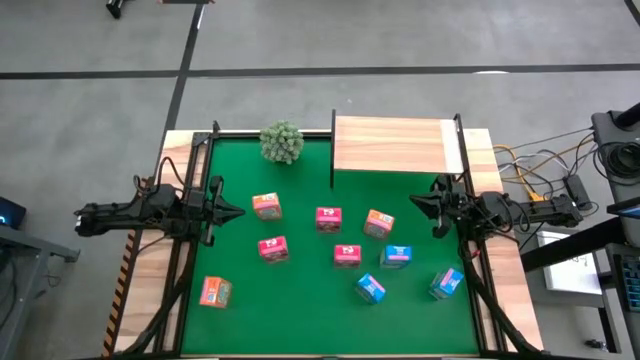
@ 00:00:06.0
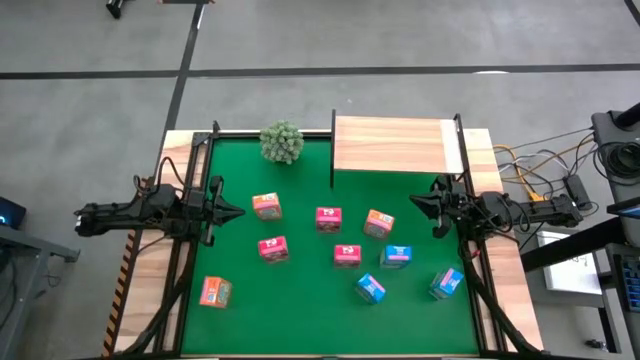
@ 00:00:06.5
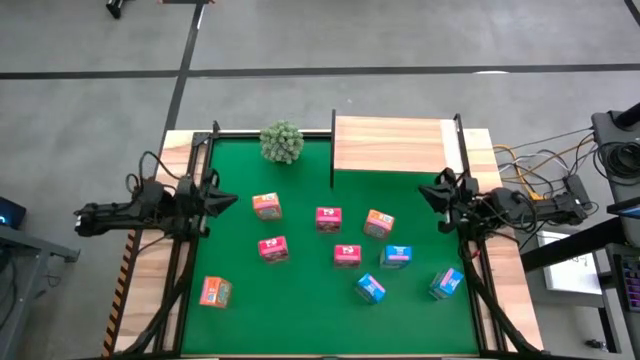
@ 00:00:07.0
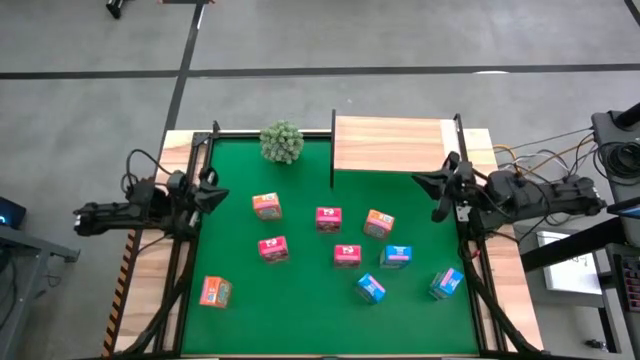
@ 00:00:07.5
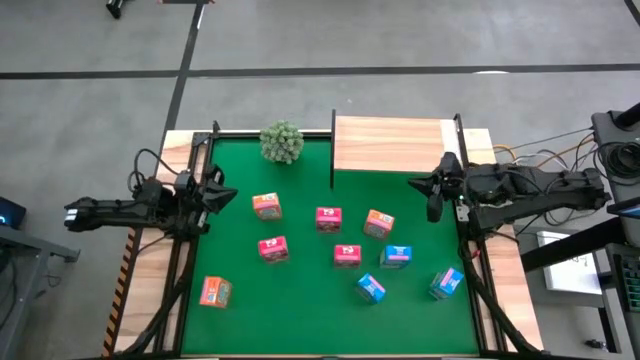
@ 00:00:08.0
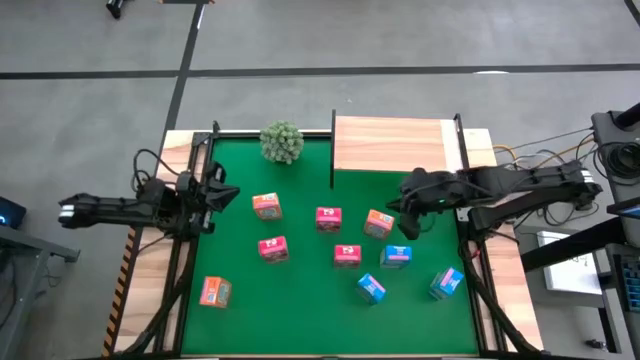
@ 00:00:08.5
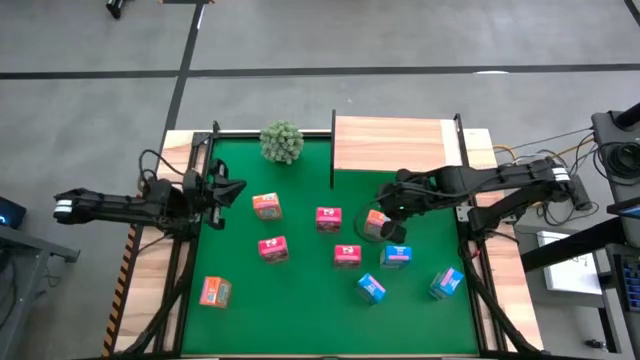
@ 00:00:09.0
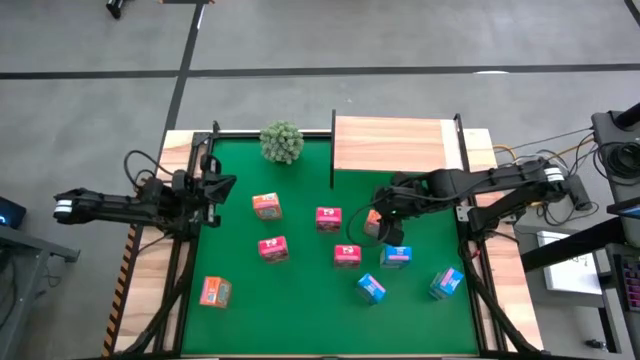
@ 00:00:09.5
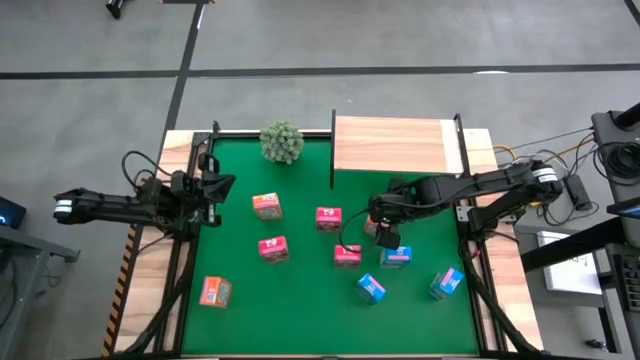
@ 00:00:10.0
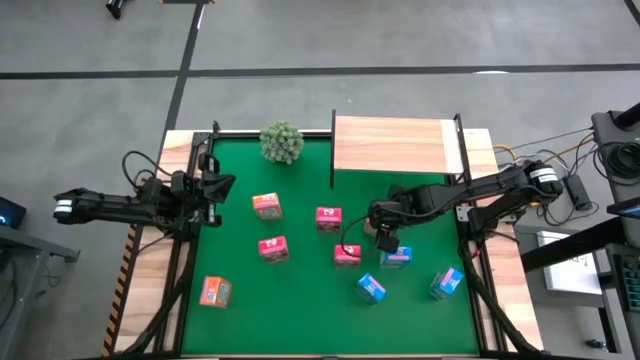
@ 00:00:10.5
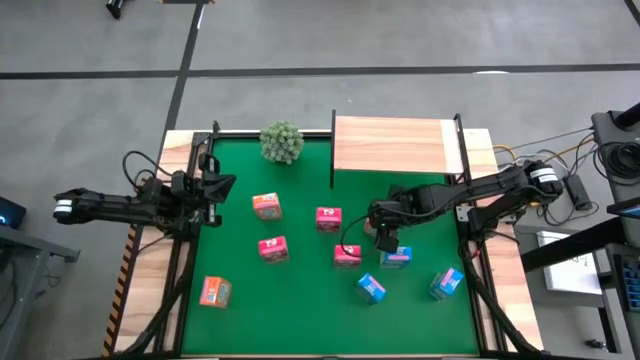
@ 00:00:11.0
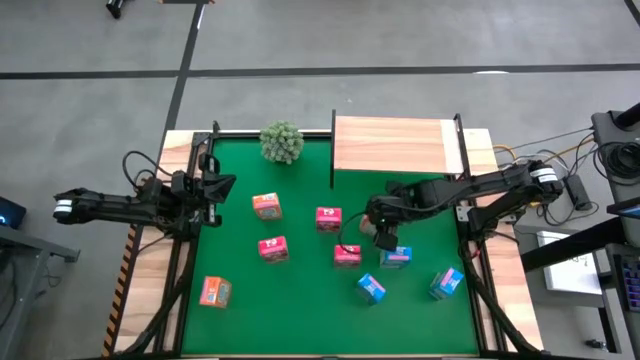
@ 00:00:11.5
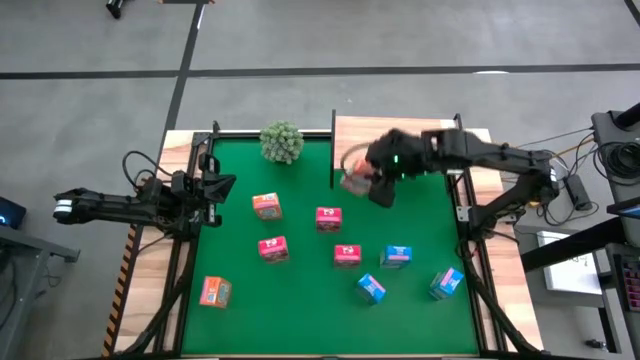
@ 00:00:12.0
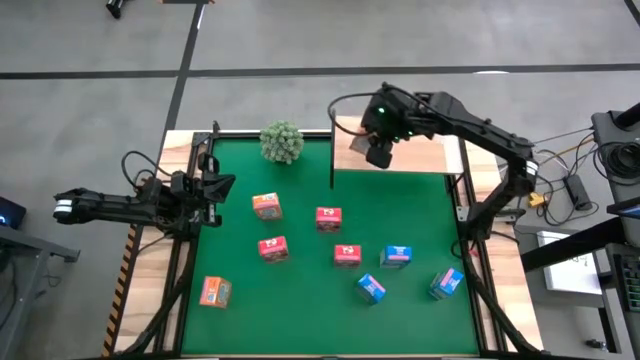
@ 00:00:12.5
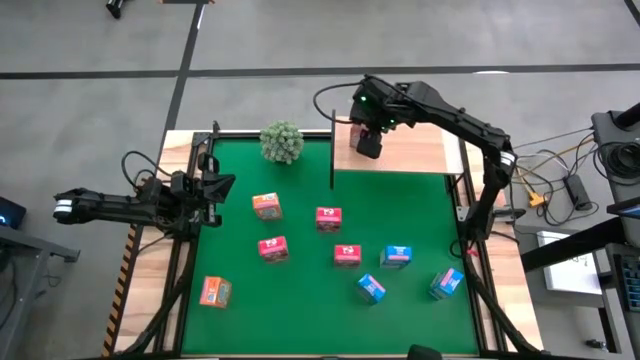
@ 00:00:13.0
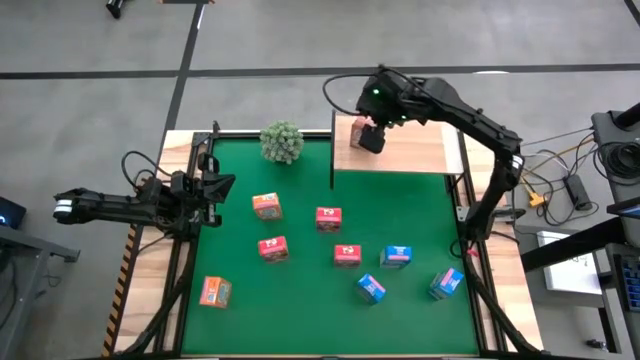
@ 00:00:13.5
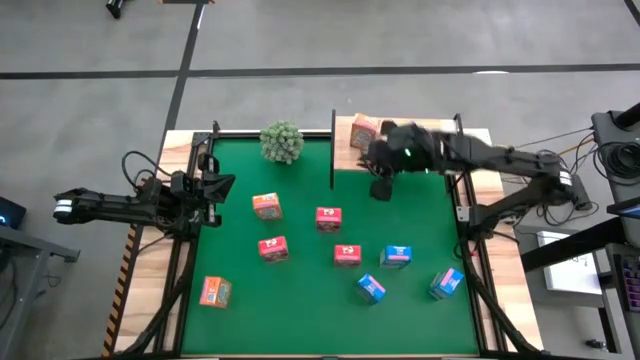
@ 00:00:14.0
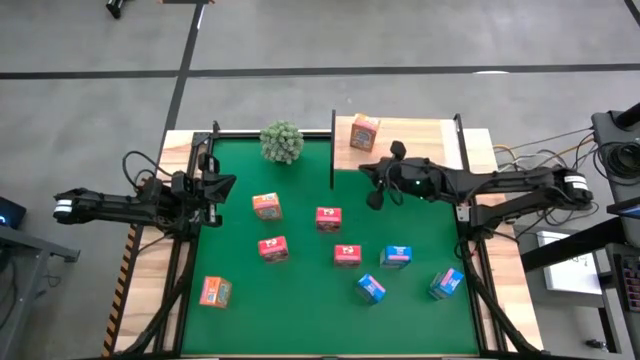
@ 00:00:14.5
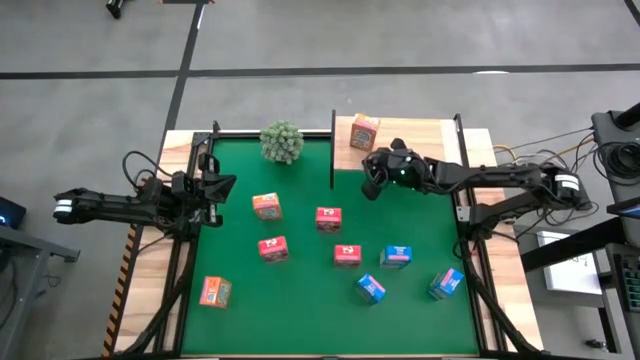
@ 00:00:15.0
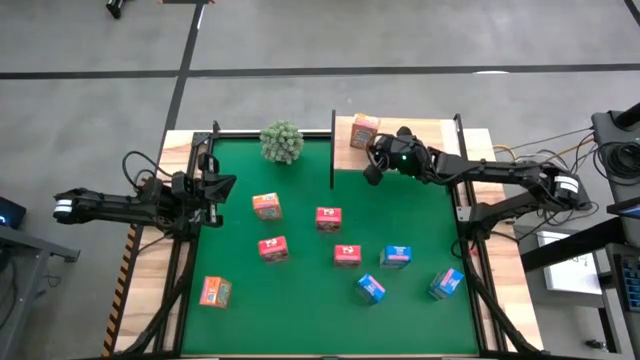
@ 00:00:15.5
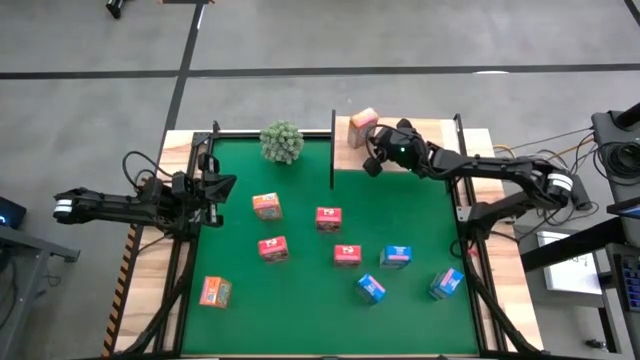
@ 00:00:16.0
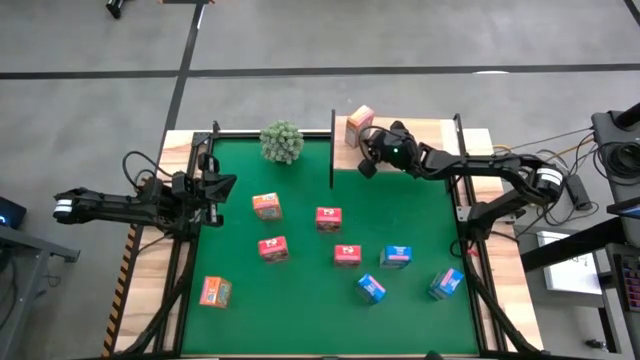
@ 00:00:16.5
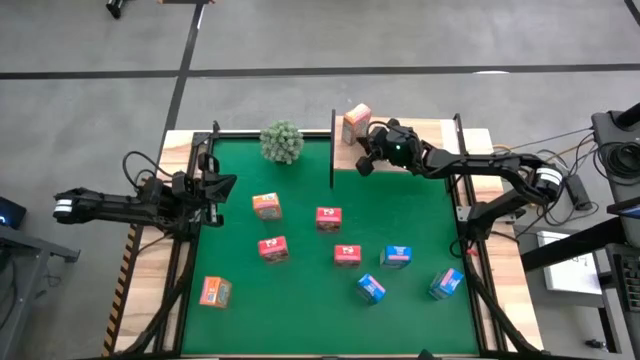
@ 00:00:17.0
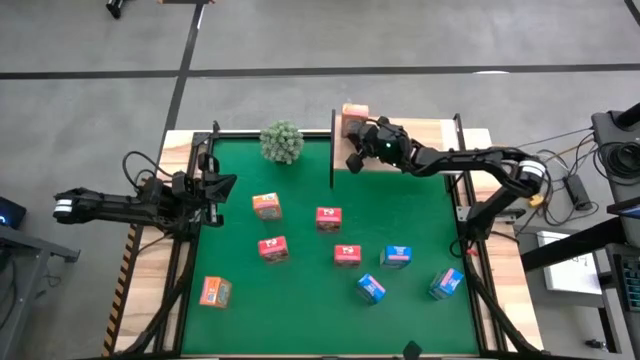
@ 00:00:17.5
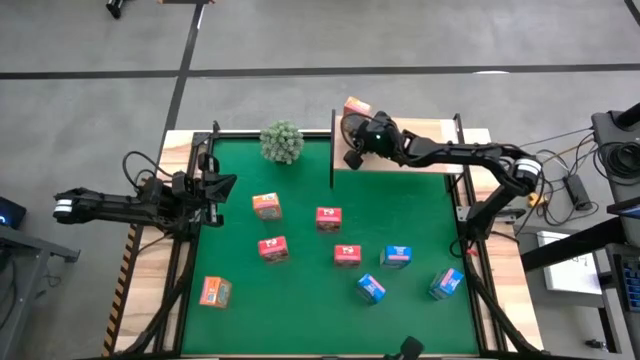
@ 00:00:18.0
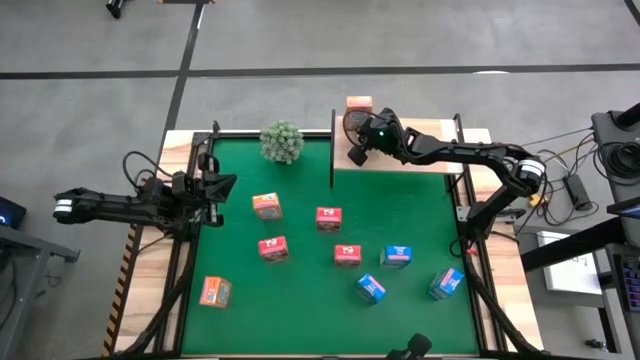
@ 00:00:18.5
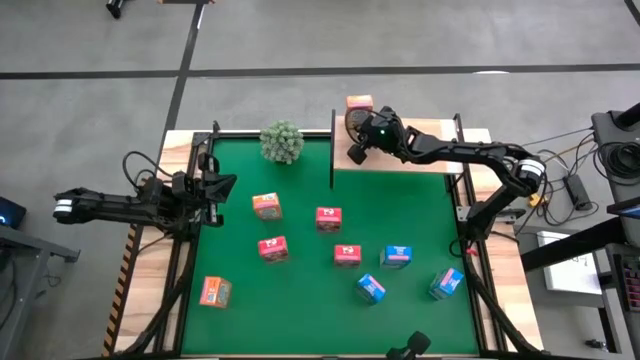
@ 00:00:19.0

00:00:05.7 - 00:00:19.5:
Task: Stack cereal on shelf
Put the top right orange cereal box on the shelf

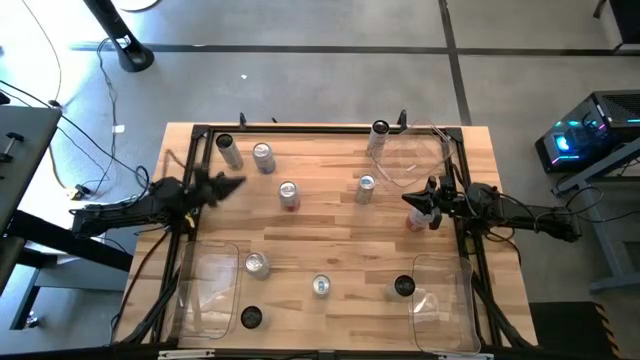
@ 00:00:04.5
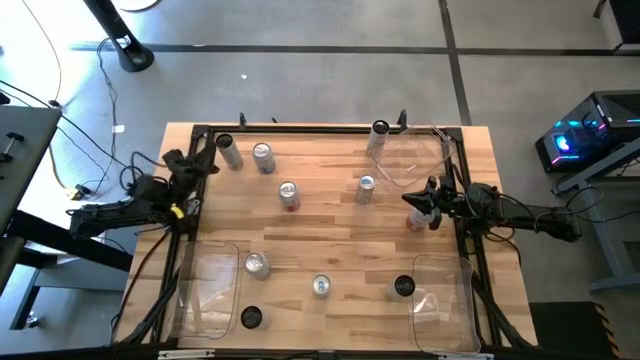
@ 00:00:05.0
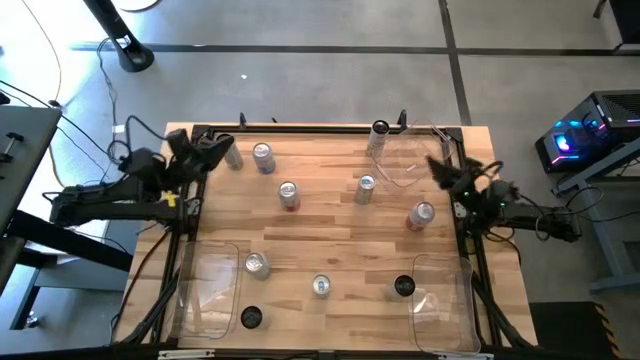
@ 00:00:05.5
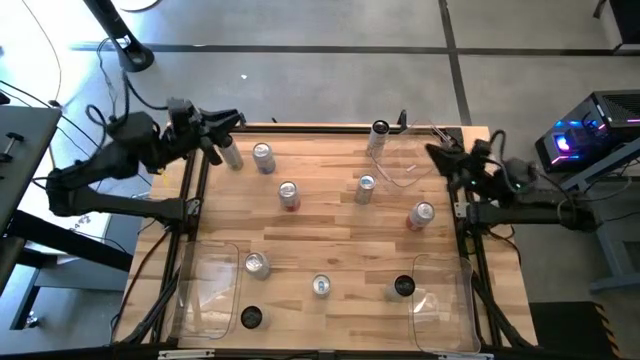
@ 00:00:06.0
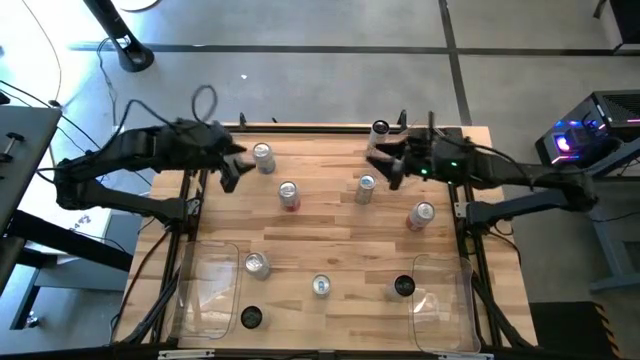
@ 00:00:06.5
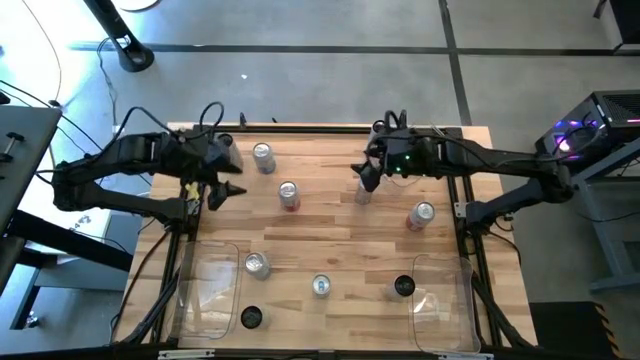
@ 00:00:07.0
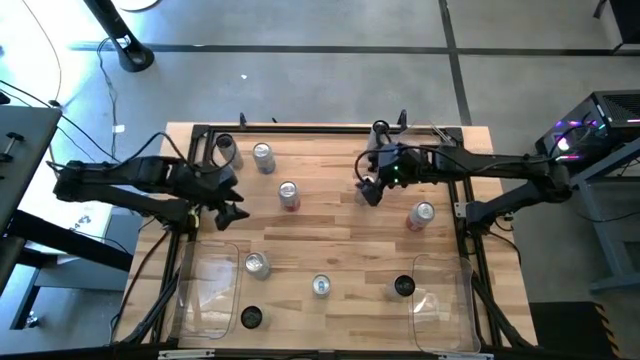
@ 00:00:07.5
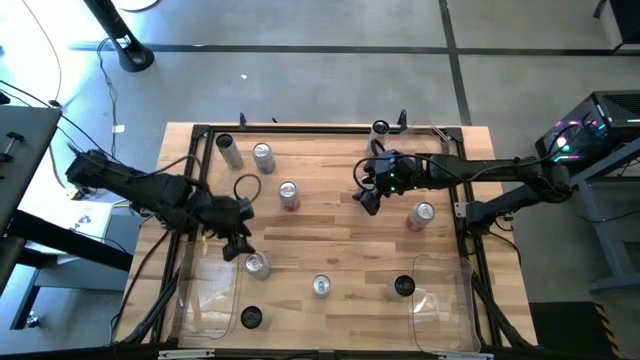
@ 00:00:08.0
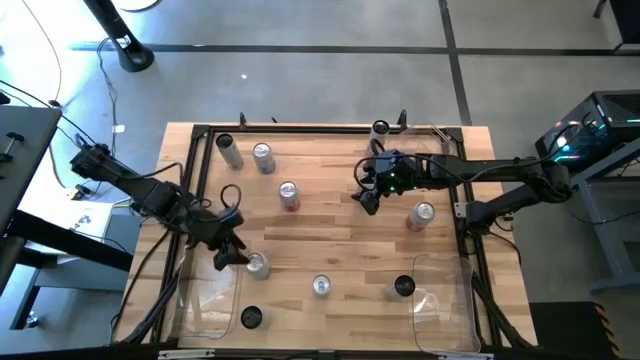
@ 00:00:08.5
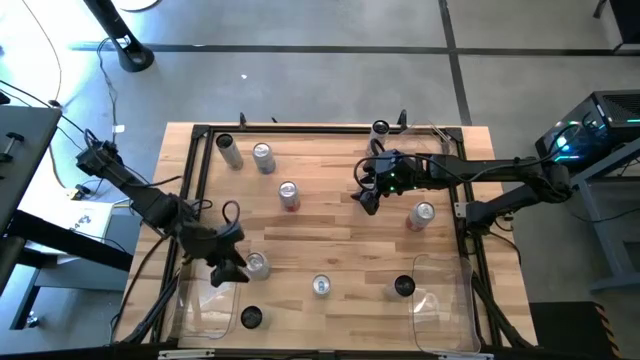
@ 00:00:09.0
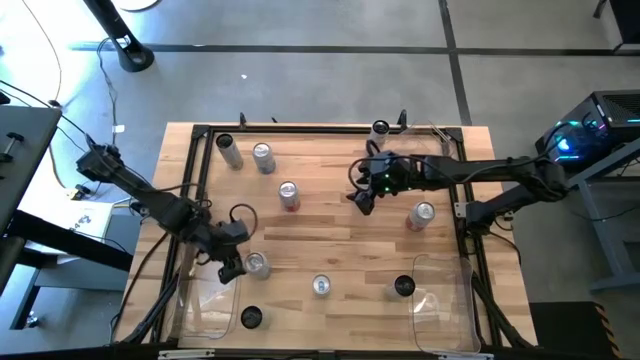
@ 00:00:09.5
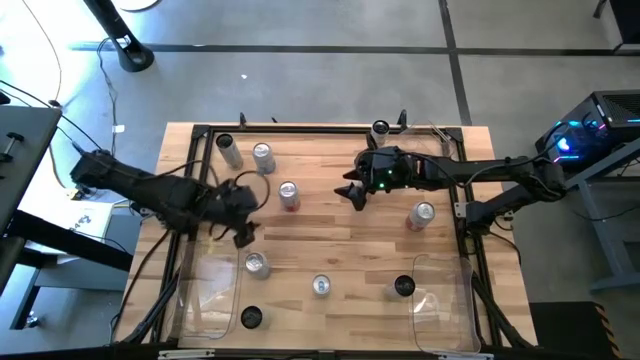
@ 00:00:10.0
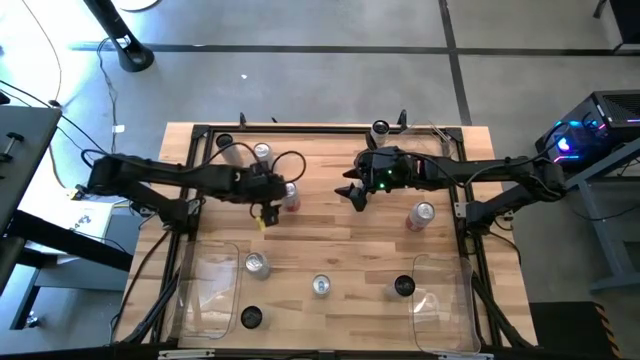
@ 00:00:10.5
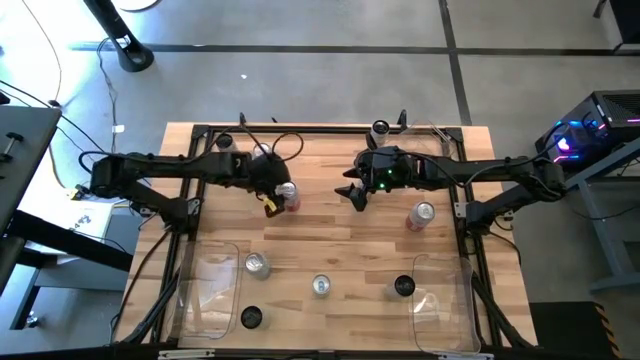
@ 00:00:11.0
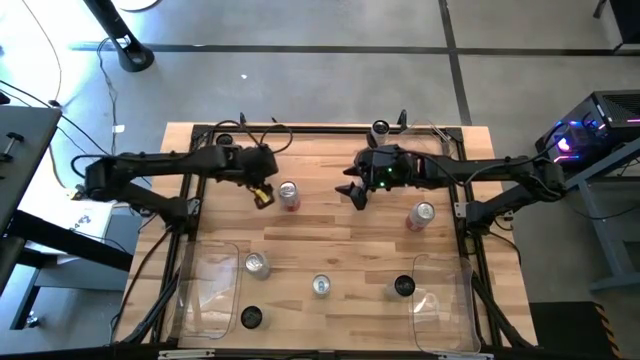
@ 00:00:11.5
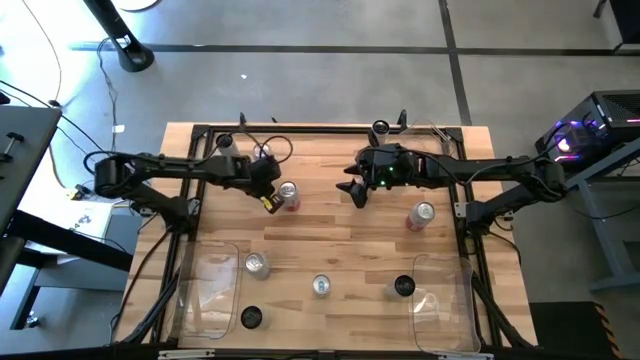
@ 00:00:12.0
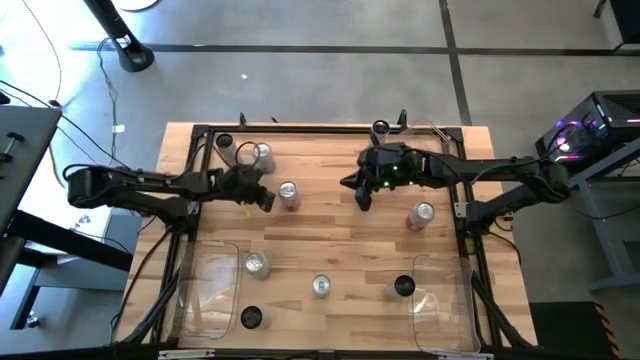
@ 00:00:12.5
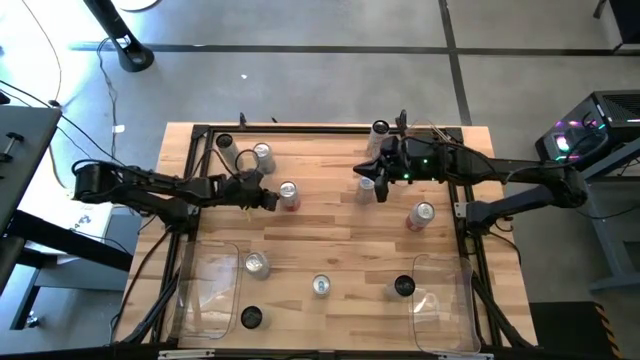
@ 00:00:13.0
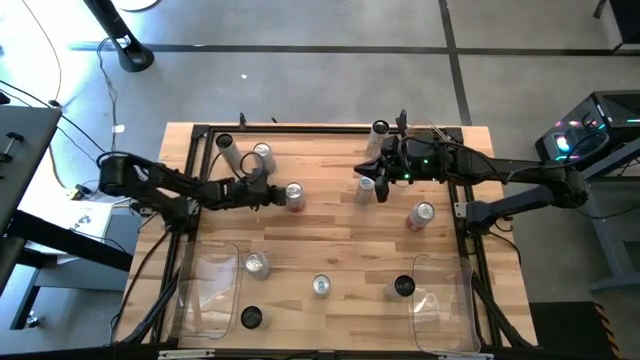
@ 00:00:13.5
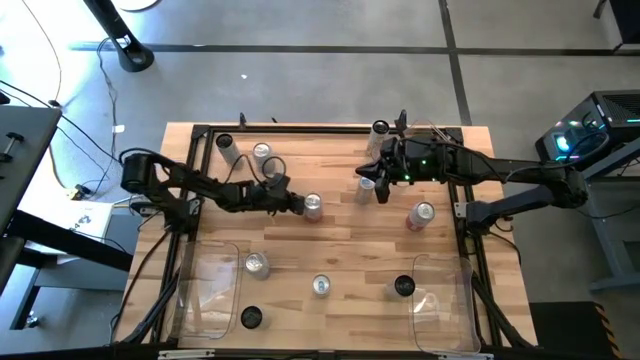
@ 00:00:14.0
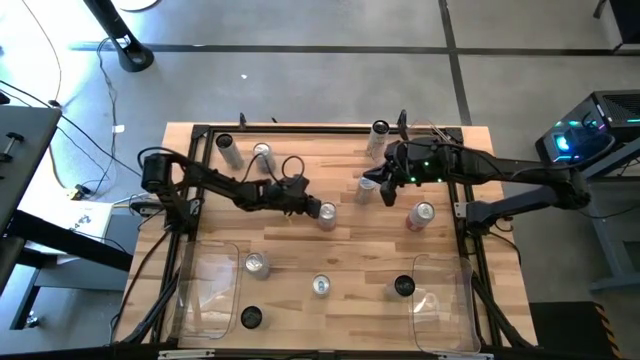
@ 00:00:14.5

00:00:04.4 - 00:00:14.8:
Task: Sort soda cans
Move the left white-pink soda can to the center of the table
